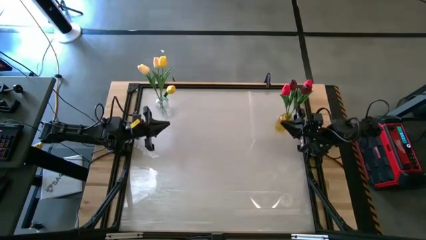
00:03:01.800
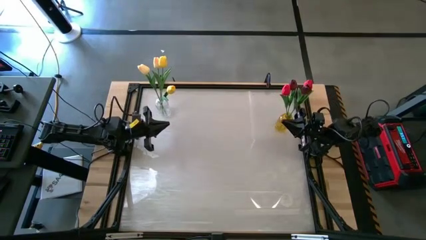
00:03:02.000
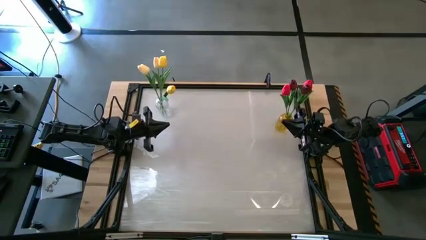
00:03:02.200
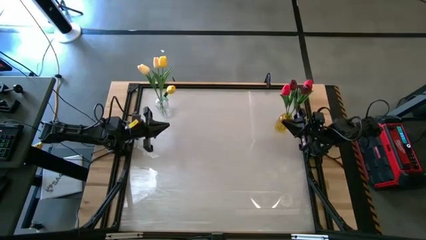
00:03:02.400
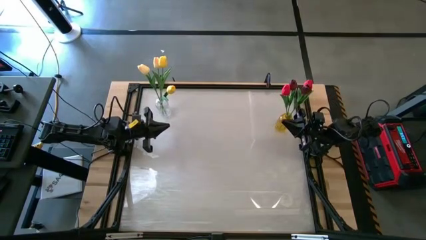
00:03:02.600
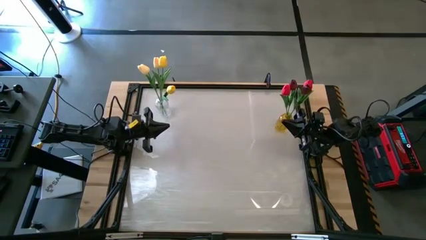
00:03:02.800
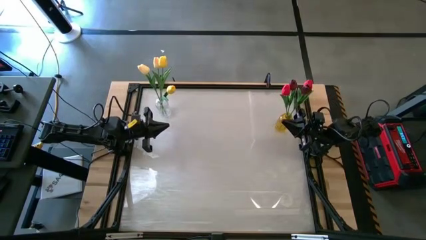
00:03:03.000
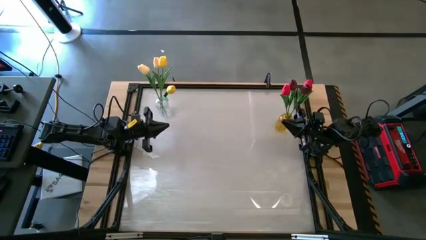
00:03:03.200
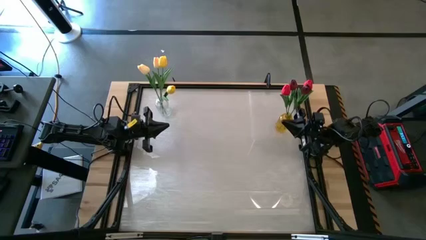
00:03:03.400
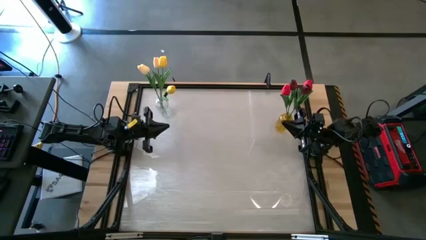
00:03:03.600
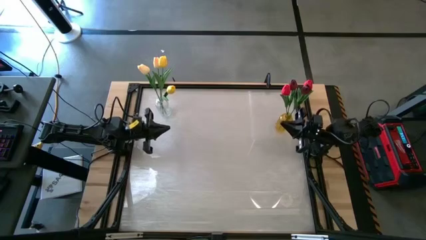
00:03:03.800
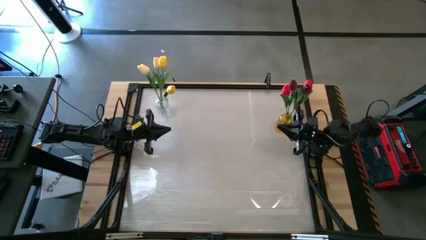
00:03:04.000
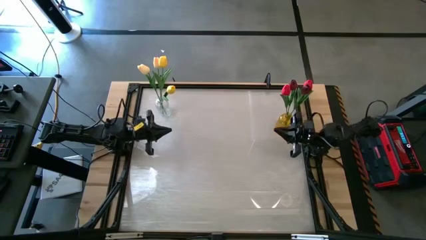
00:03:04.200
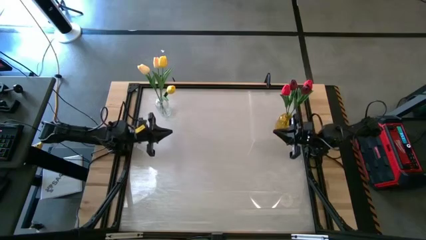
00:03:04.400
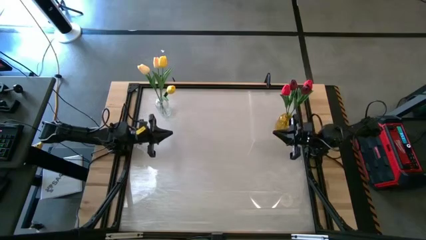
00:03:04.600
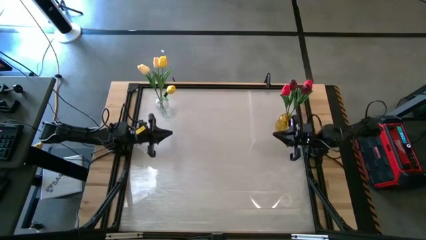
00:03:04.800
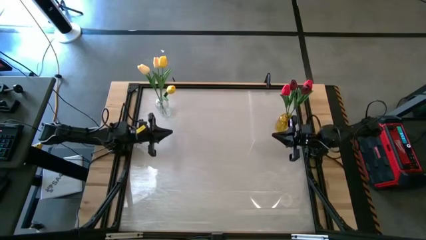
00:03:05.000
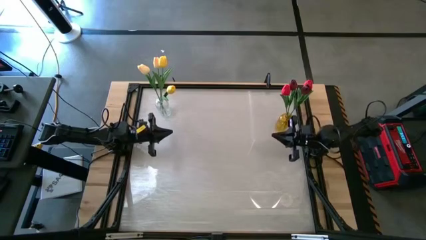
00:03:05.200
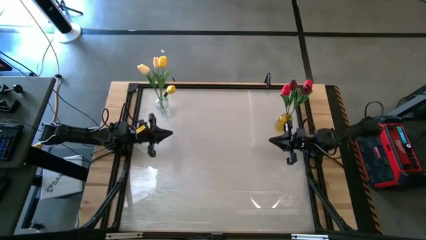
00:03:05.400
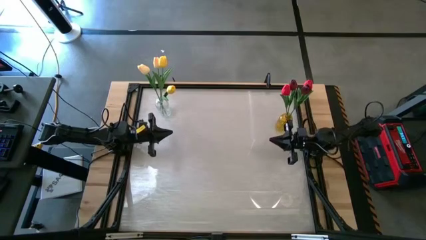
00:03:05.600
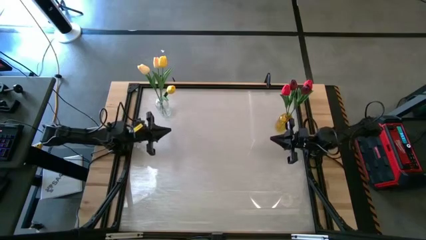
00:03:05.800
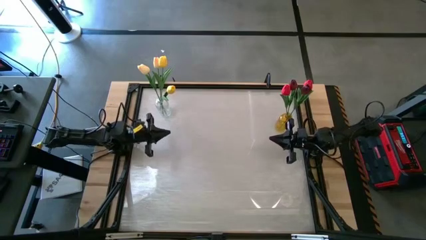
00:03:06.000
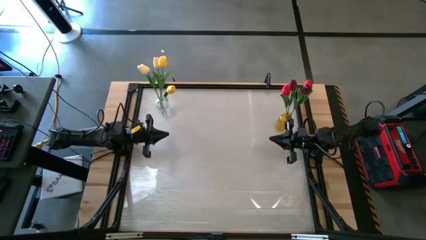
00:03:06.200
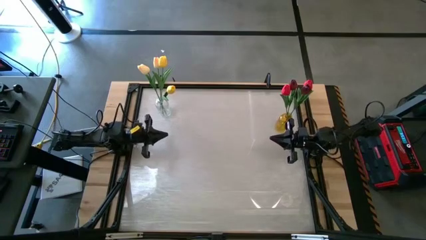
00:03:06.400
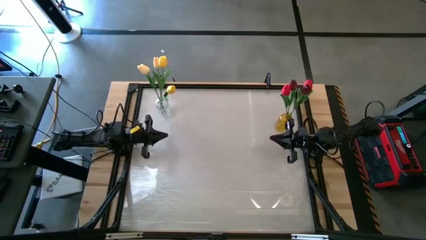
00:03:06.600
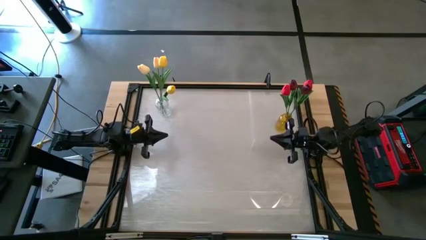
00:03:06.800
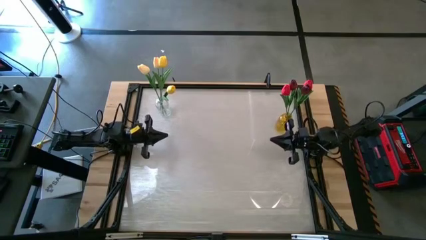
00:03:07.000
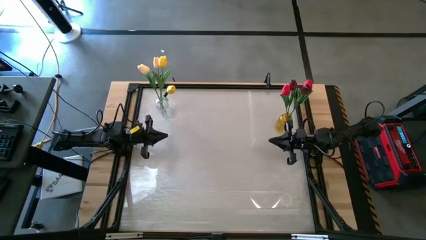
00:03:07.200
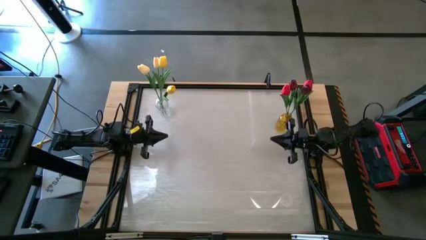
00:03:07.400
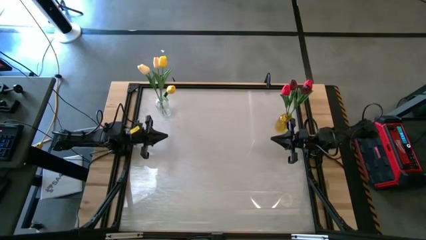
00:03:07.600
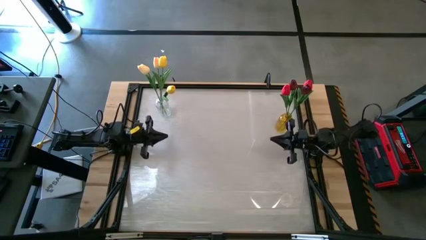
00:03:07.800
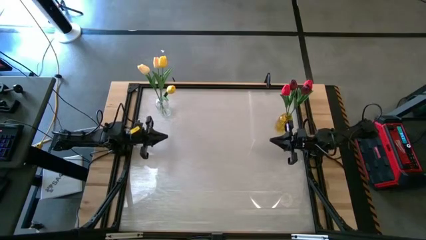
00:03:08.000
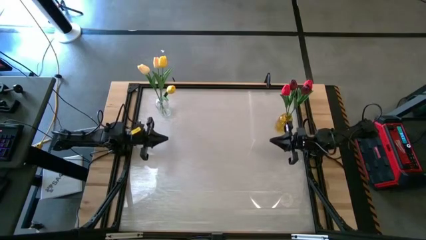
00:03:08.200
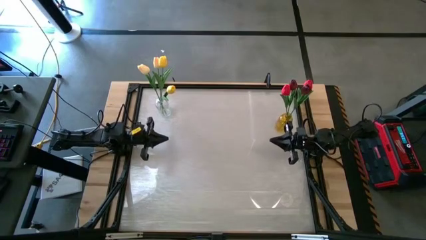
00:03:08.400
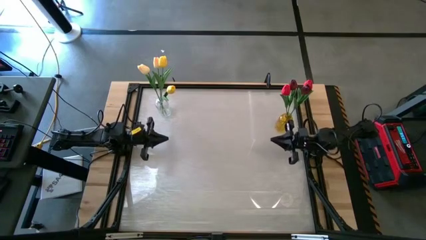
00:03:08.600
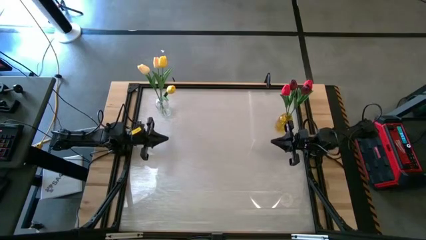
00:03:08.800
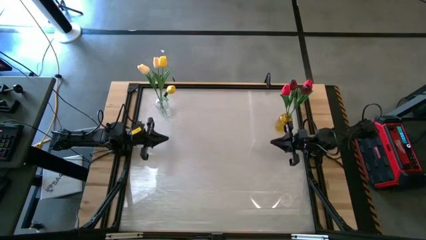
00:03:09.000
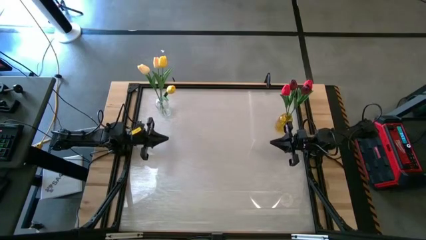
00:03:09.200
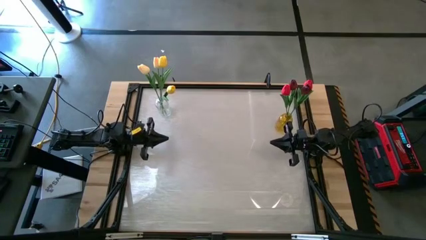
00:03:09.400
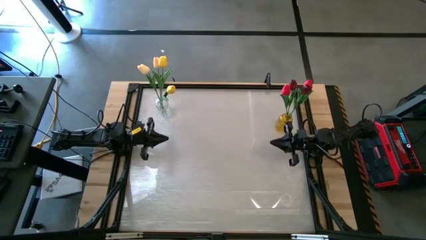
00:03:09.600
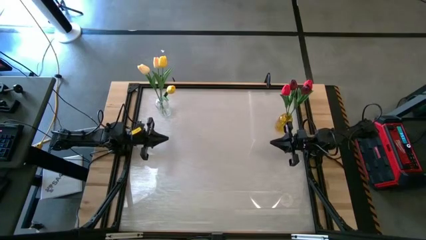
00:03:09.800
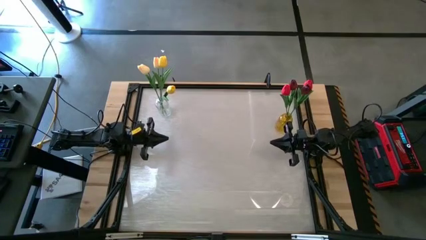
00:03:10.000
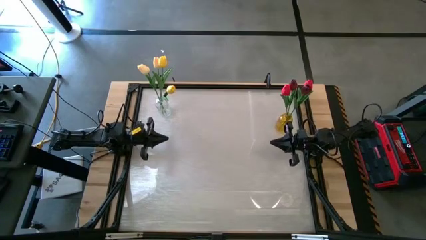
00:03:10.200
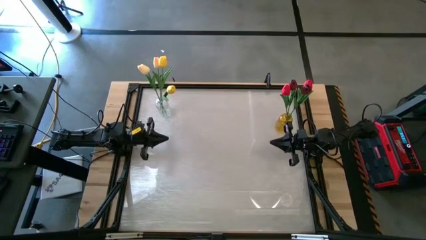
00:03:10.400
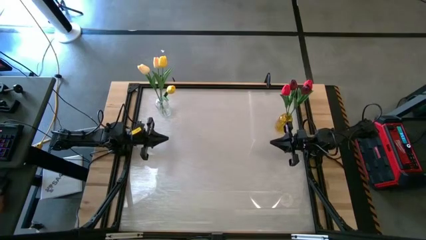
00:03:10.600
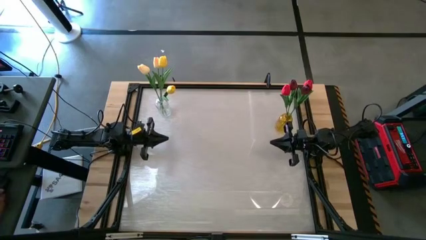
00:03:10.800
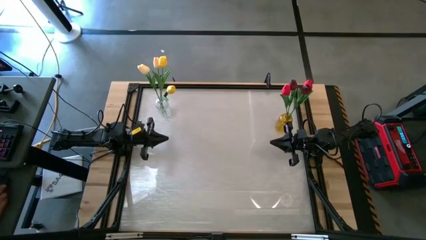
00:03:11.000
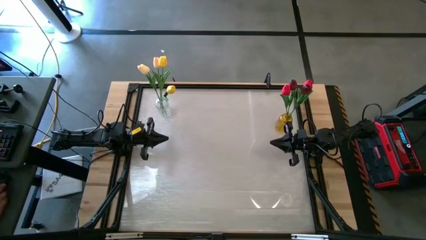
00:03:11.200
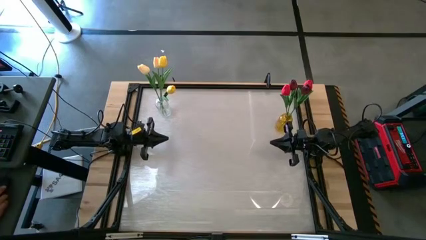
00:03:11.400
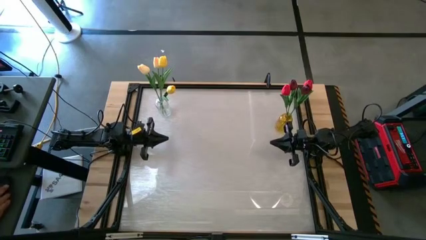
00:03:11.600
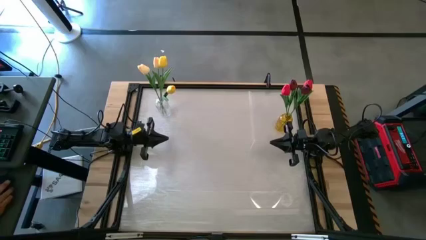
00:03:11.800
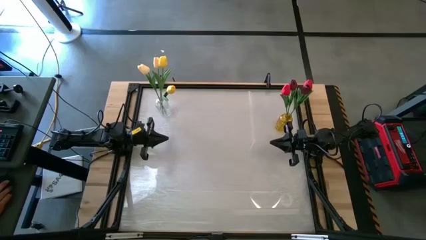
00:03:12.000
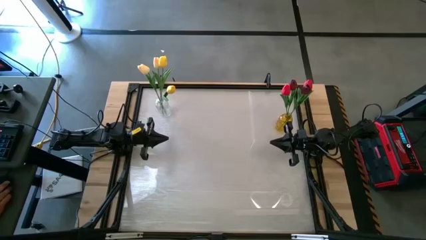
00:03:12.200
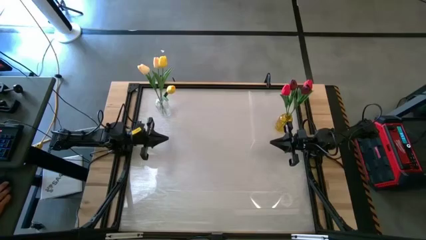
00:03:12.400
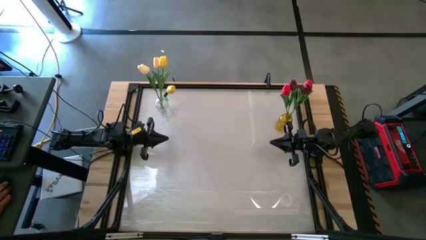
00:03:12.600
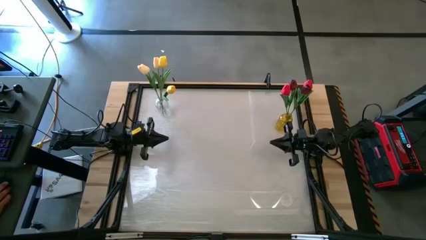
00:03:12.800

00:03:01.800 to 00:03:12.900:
Task: Sort flowers into vase by color
Return to Home Position

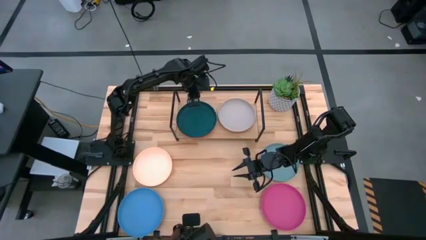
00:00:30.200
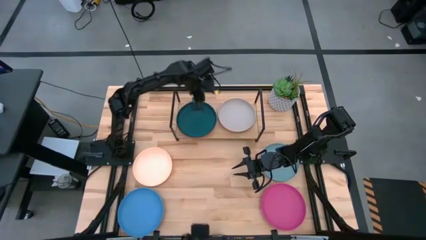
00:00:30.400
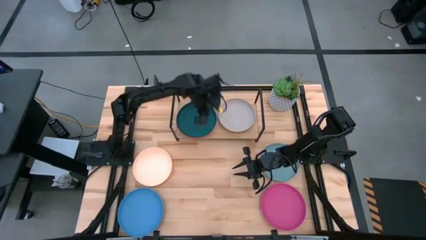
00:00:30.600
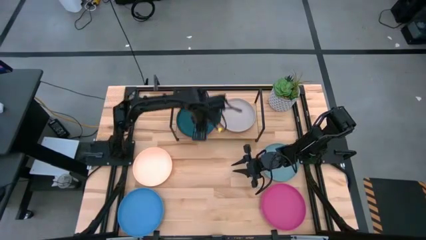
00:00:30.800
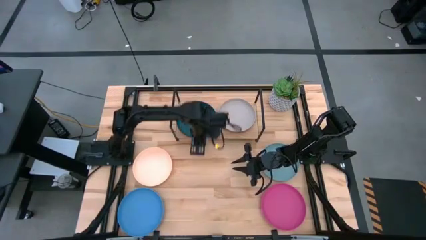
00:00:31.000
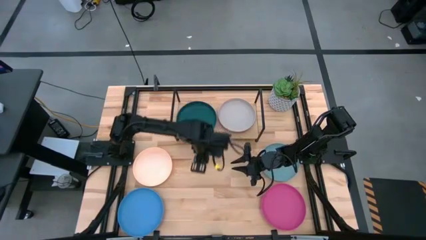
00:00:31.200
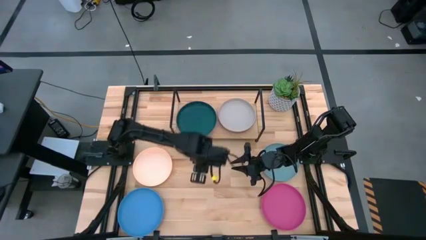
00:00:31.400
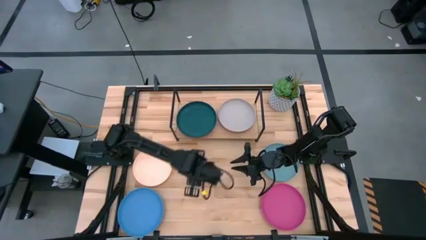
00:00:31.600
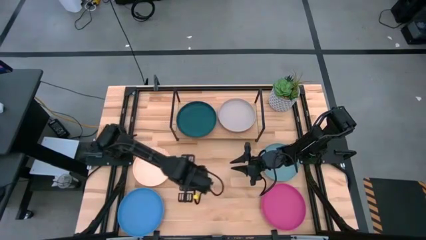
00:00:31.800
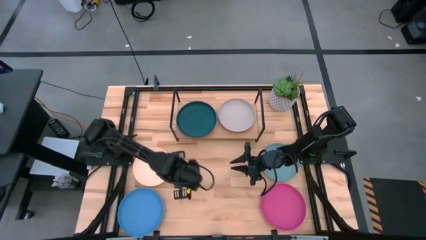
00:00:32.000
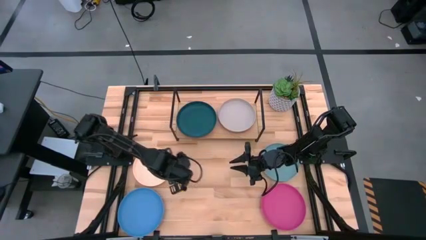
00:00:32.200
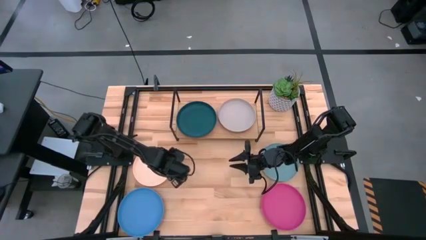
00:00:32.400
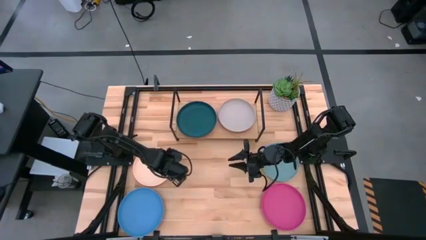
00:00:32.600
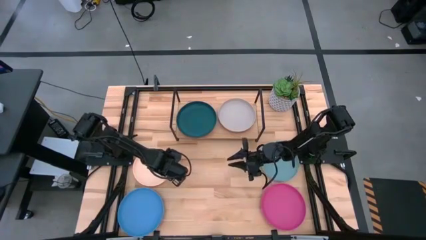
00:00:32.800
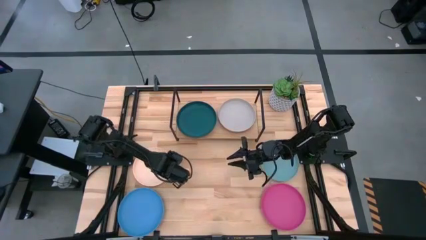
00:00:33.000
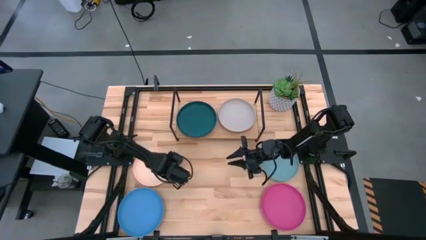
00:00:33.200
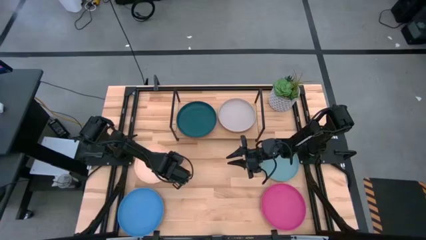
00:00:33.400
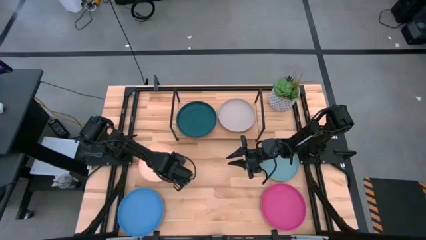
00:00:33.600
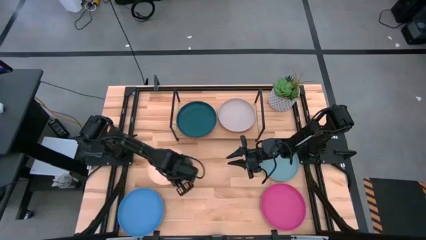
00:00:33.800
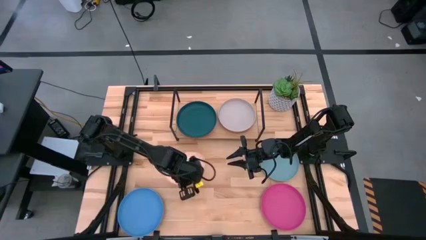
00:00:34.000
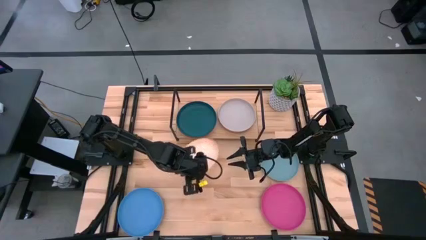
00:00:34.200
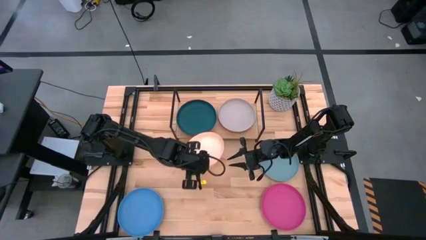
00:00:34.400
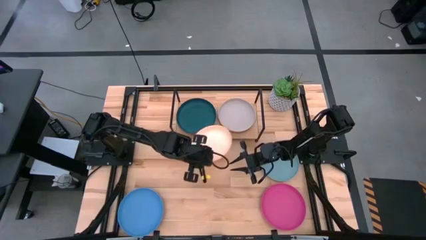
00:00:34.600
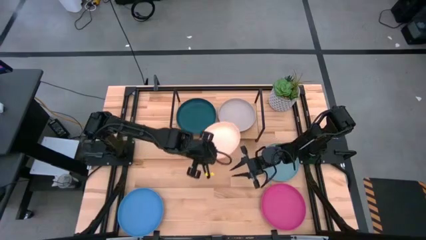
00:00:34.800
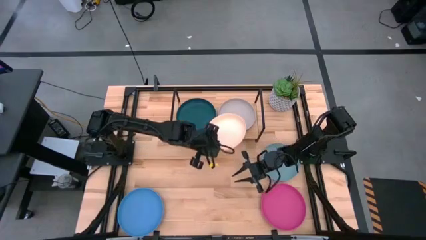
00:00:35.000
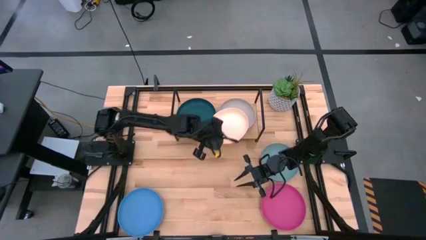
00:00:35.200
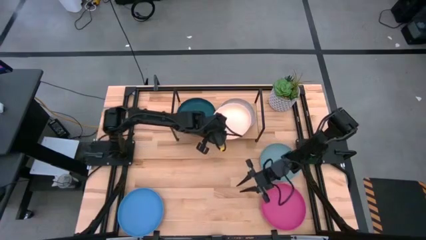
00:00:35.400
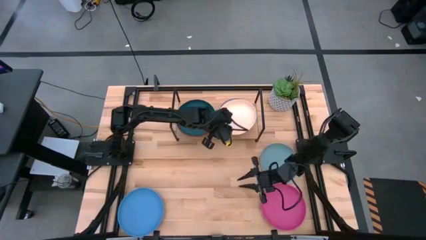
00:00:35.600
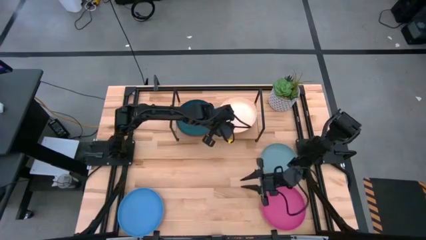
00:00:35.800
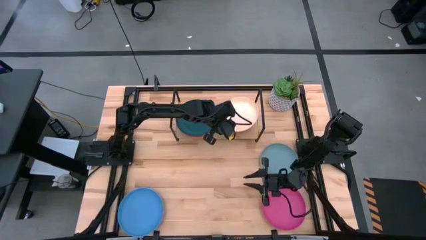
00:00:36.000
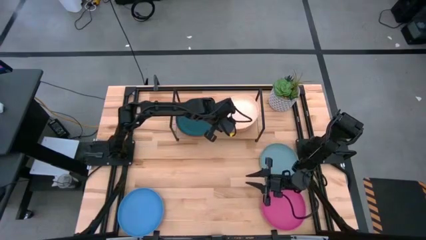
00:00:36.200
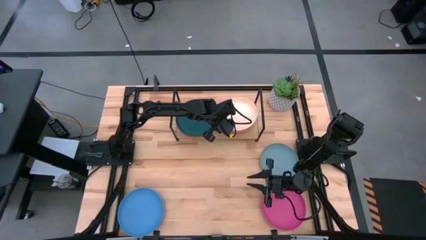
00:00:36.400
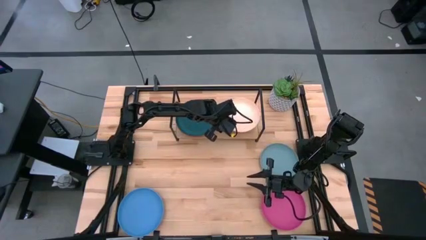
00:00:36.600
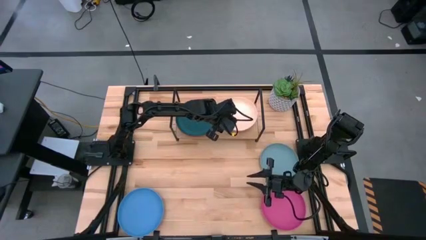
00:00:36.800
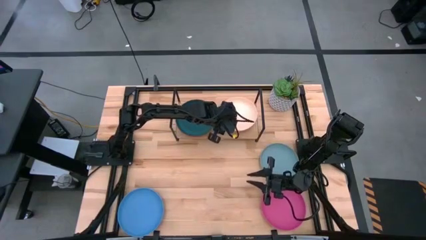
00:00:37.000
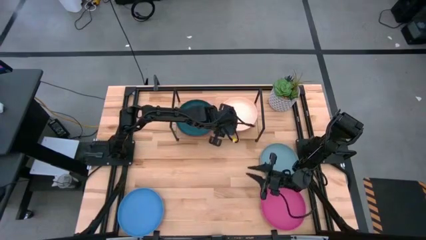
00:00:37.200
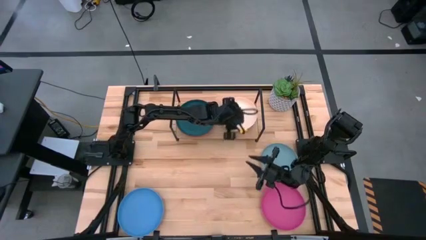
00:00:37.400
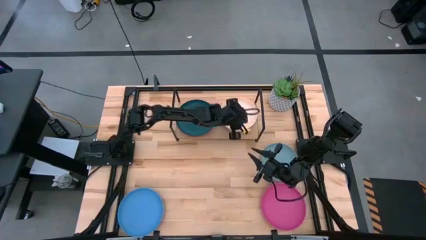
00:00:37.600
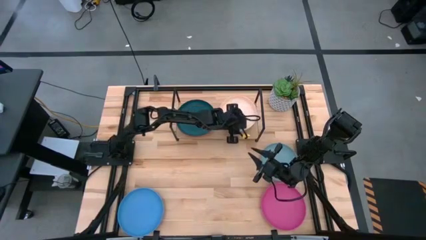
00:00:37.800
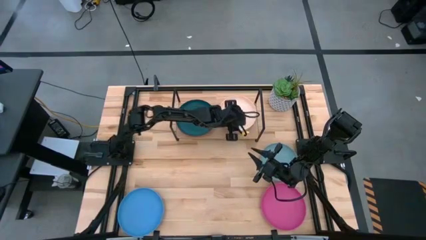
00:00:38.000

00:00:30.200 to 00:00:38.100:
Task: Place and stack plates onto a shelf
Stack the light orange plate on top of the gray plate on the shelf
